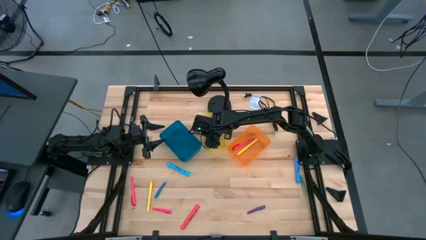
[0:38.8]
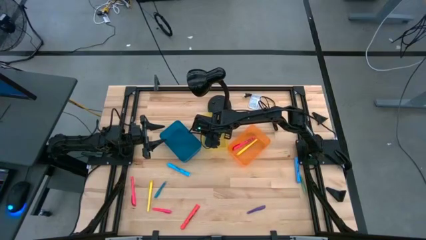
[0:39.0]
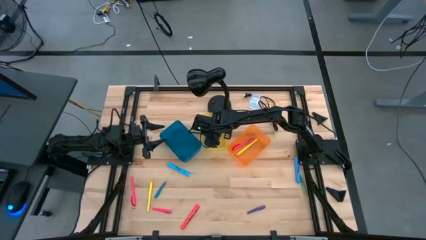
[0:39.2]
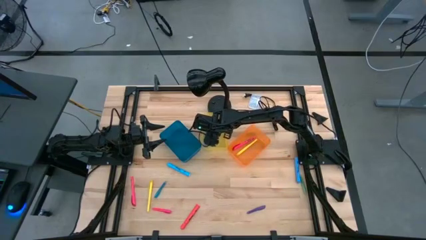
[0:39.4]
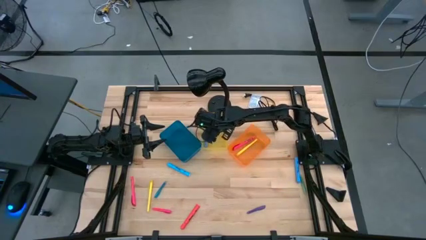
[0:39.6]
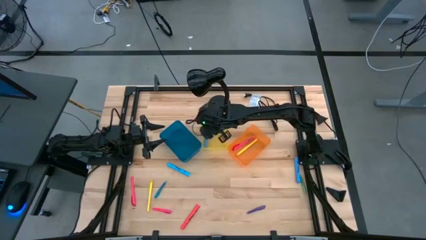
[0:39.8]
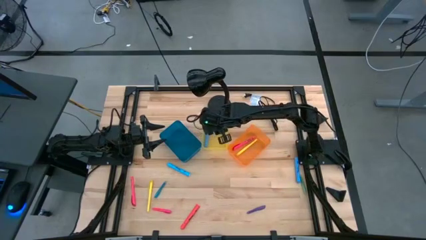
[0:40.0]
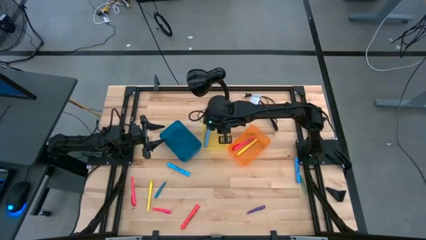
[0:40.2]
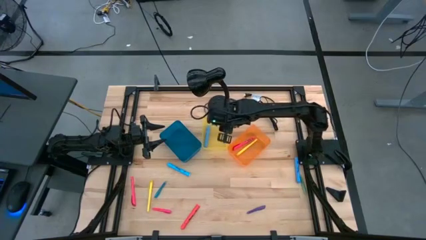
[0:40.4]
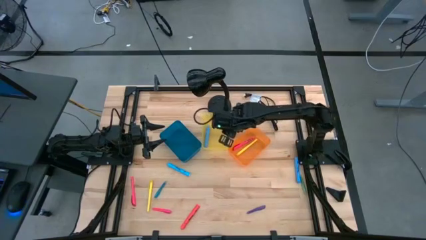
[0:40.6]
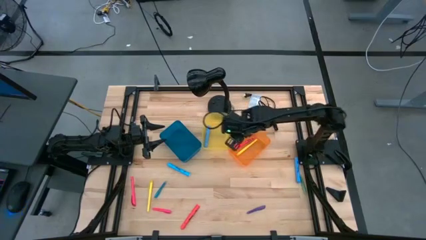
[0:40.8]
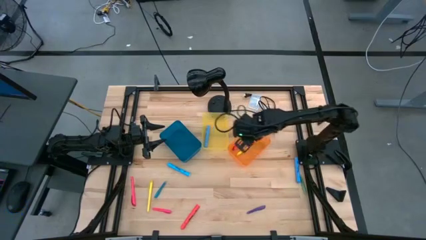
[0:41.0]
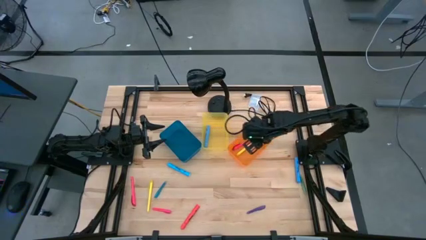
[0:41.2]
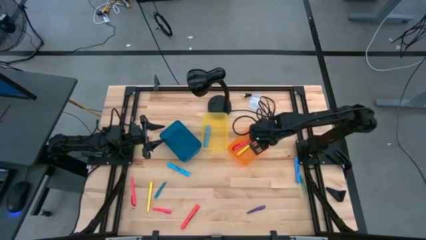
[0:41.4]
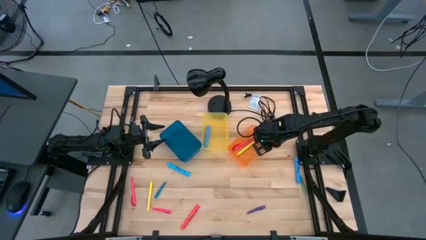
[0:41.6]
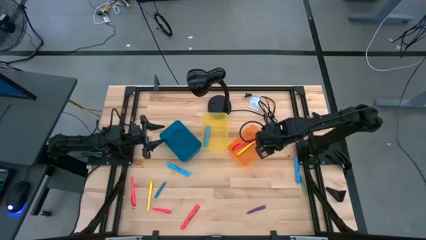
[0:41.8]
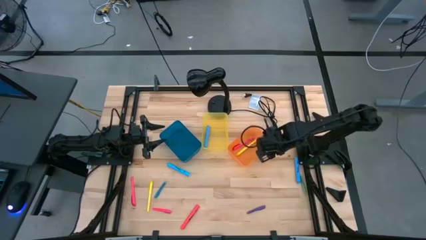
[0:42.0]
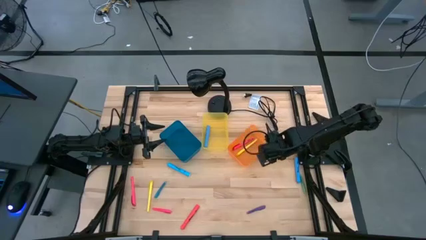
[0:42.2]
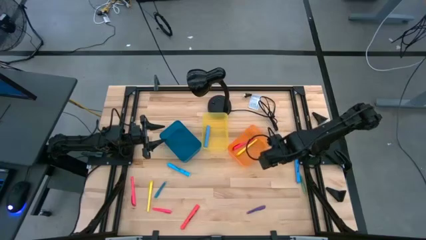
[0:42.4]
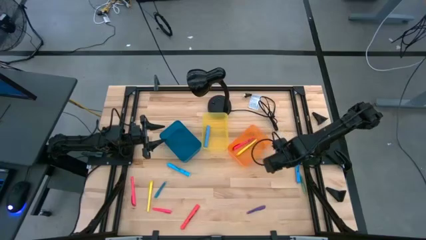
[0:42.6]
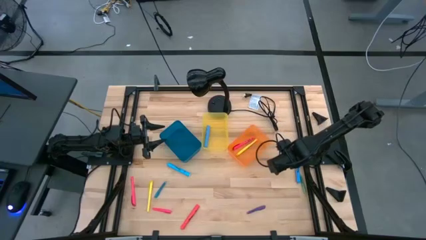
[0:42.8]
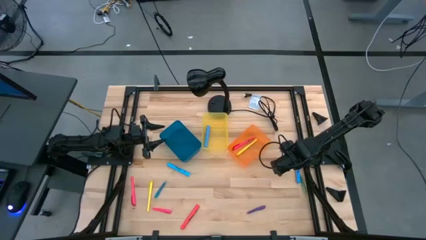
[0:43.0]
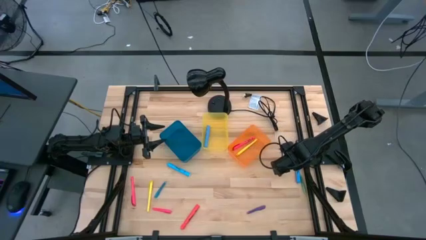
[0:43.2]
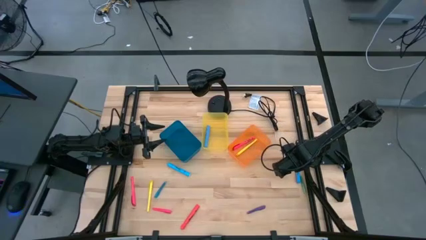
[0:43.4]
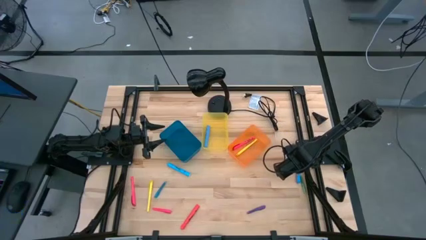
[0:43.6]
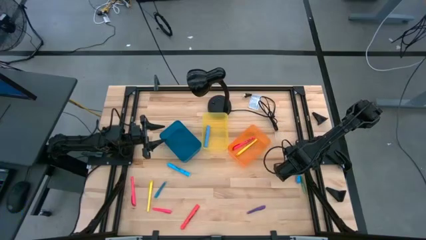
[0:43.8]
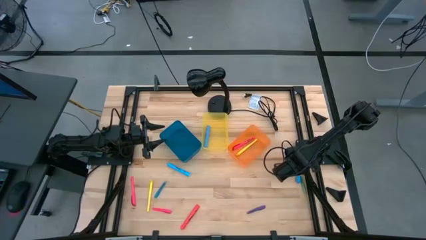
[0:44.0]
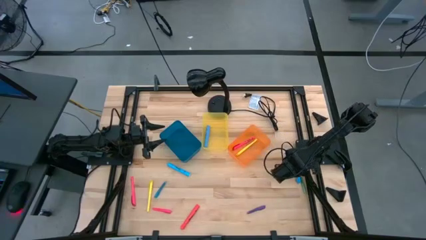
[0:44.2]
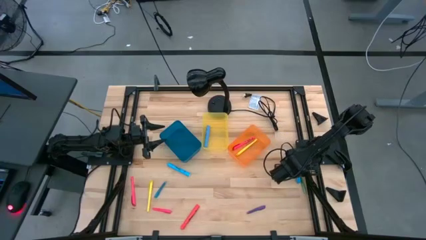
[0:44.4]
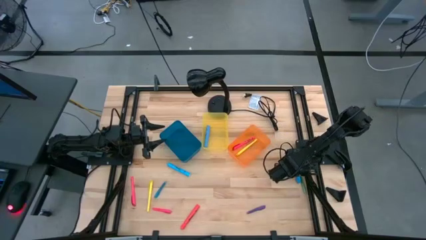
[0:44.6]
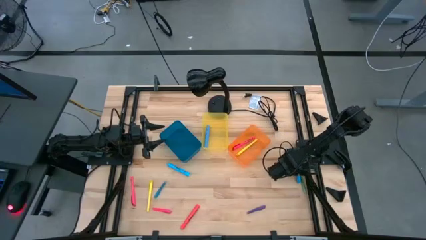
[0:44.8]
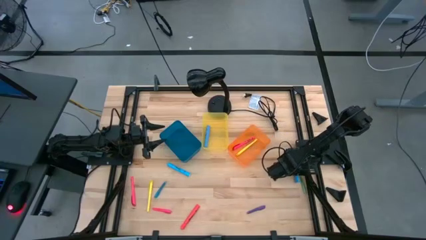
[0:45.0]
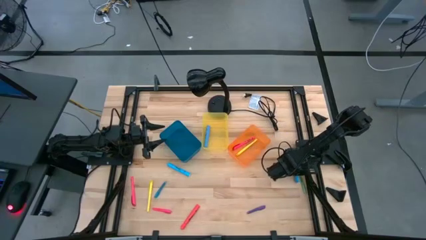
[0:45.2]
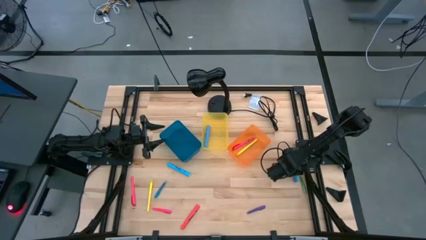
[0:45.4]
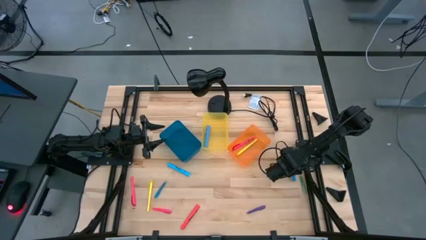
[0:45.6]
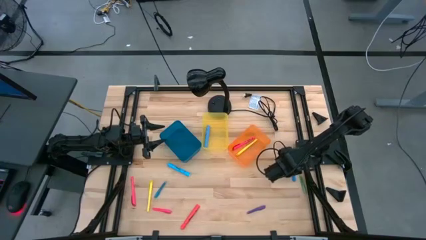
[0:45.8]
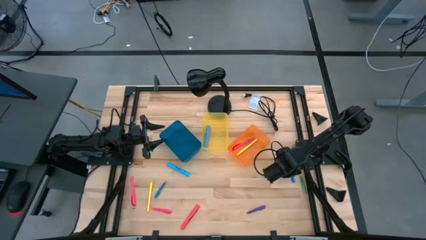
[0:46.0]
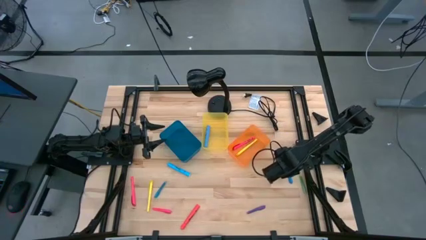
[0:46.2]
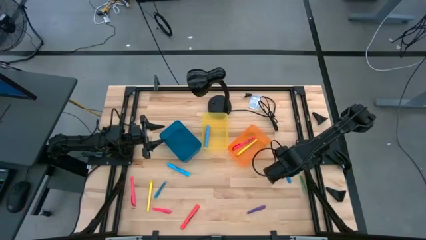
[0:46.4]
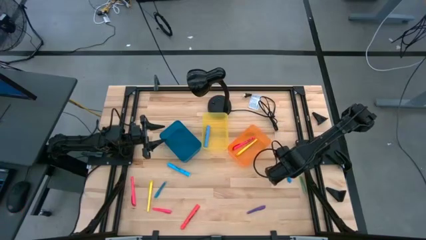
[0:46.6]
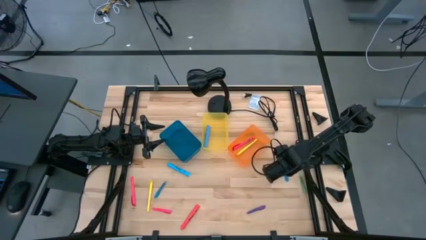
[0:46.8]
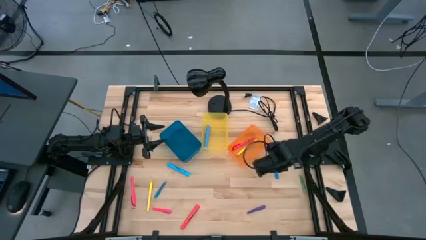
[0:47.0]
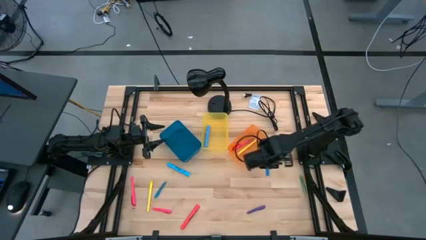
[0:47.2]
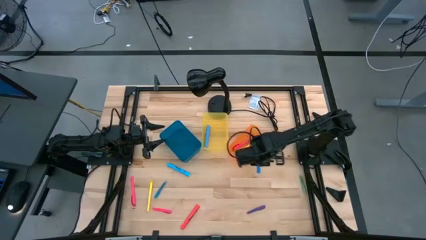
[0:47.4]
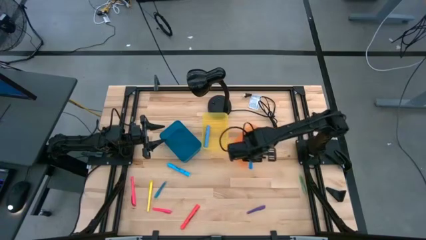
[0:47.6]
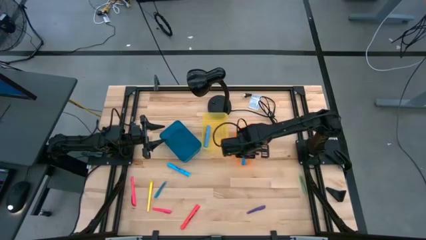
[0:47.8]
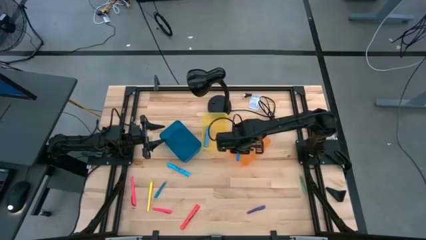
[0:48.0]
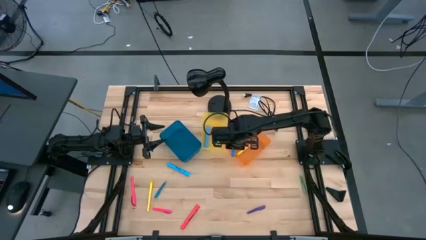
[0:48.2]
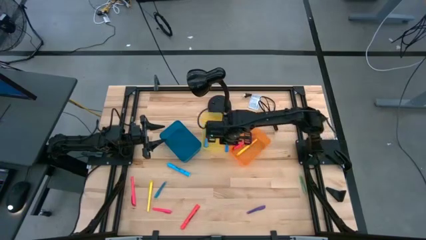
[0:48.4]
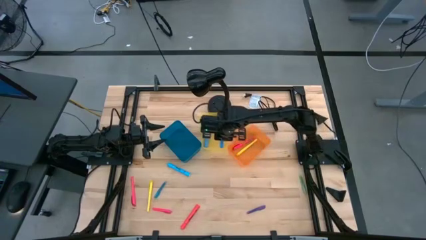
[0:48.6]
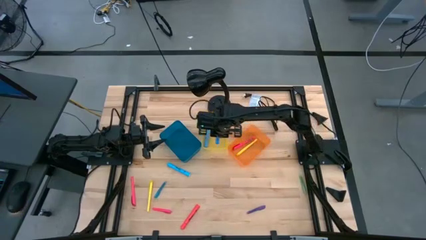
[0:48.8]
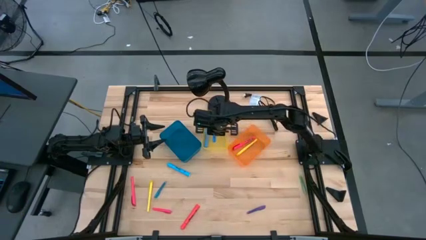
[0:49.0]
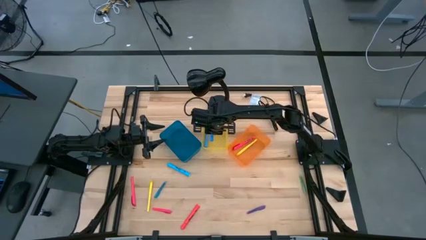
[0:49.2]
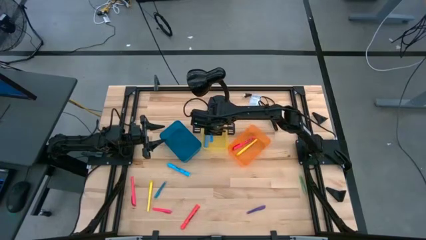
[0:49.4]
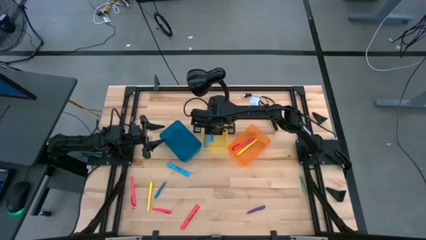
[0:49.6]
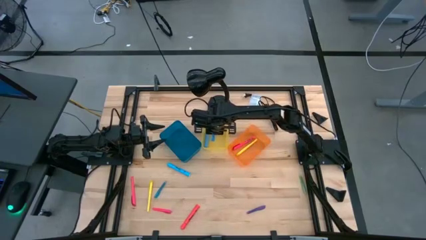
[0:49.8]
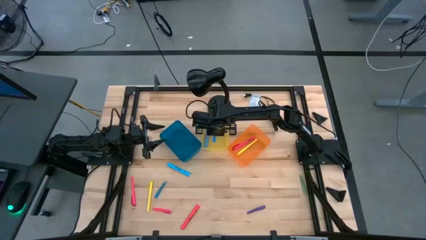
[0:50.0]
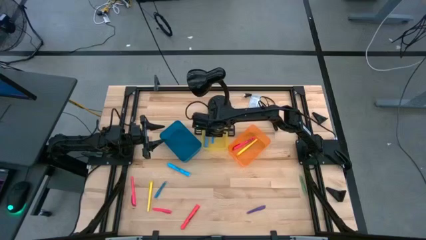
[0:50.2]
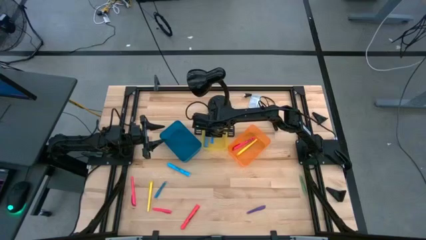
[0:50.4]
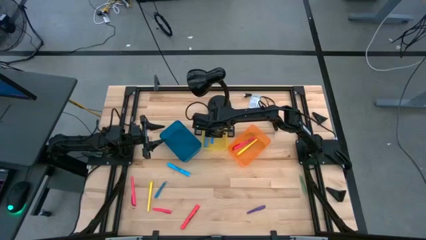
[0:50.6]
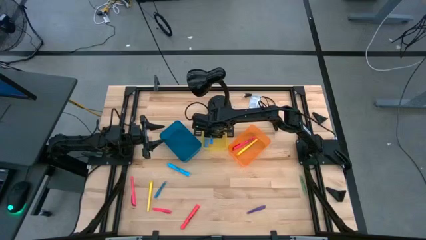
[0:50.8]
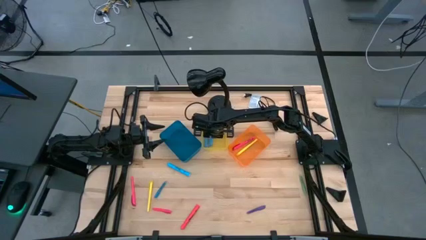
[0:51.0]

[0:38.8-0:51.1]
Task: Pick & Place Markers
Put the right blue highlighter pen into the yellow bin
